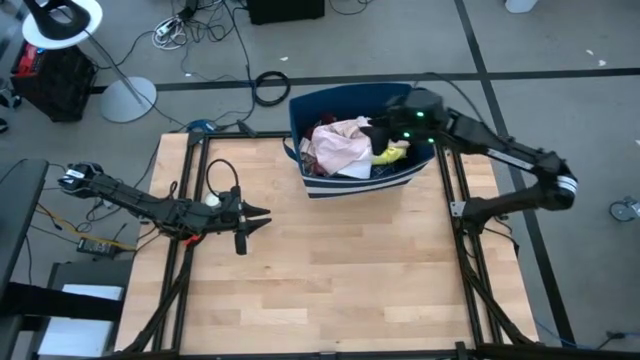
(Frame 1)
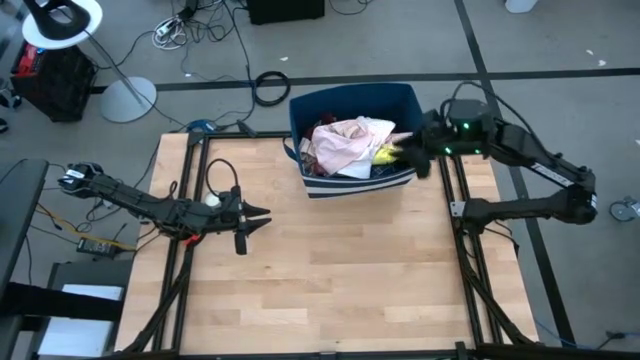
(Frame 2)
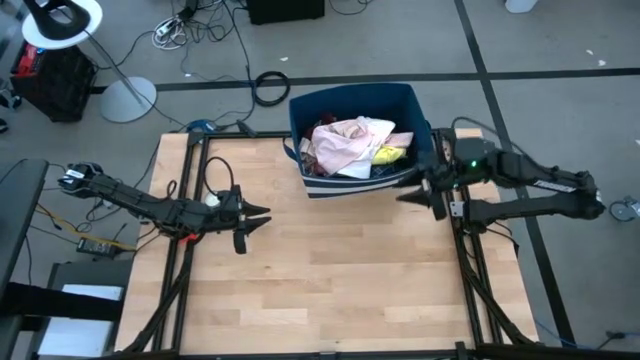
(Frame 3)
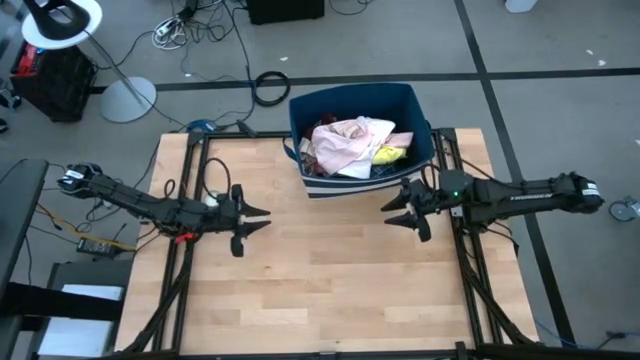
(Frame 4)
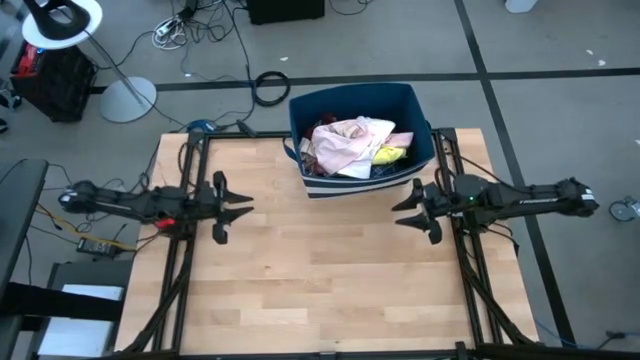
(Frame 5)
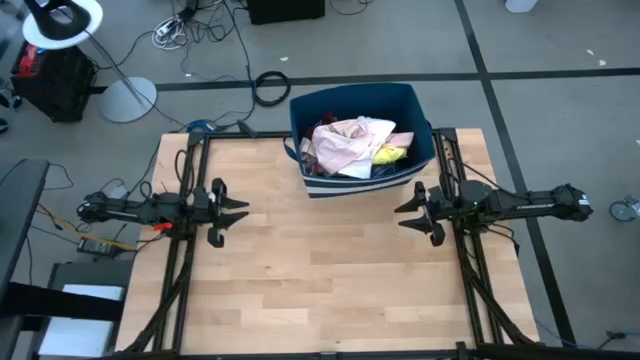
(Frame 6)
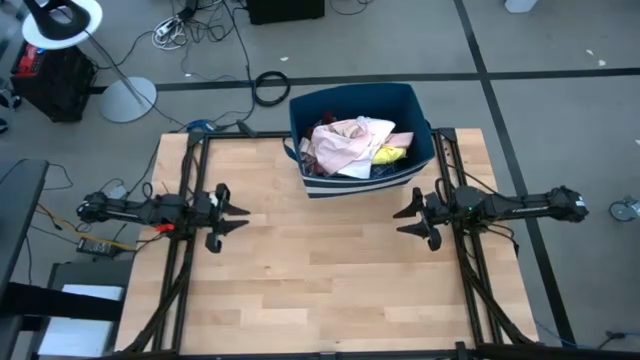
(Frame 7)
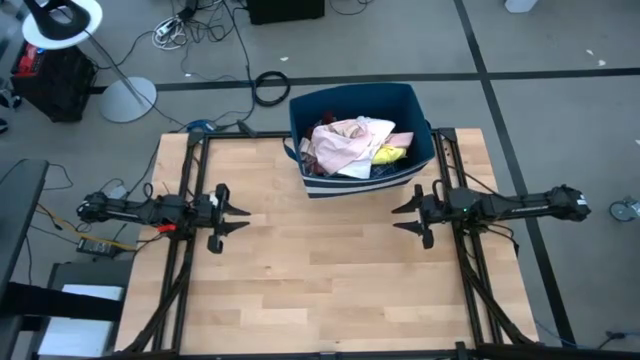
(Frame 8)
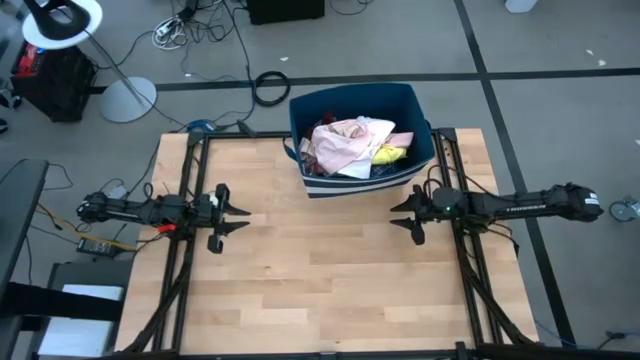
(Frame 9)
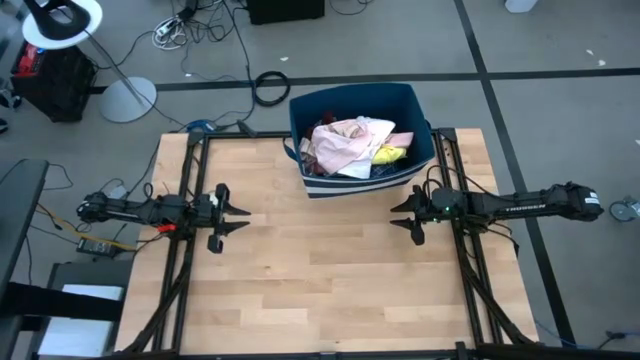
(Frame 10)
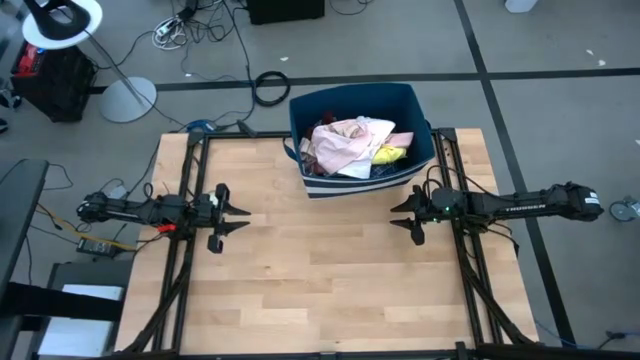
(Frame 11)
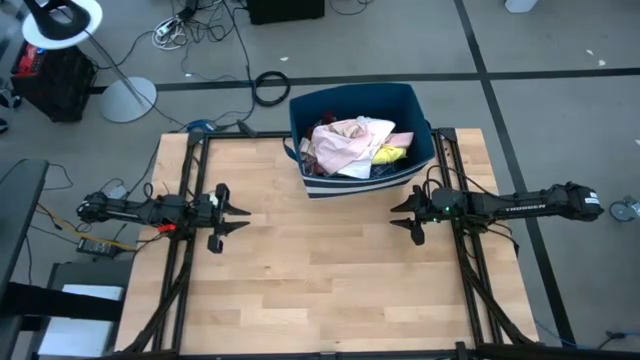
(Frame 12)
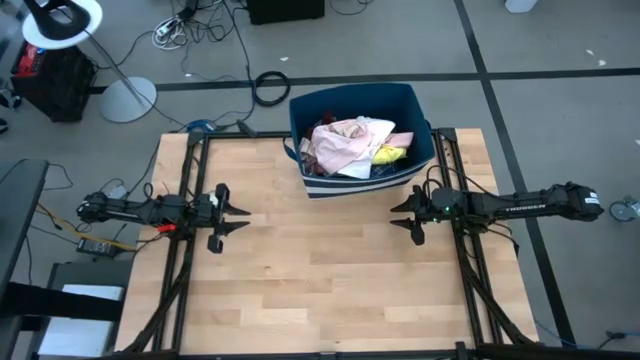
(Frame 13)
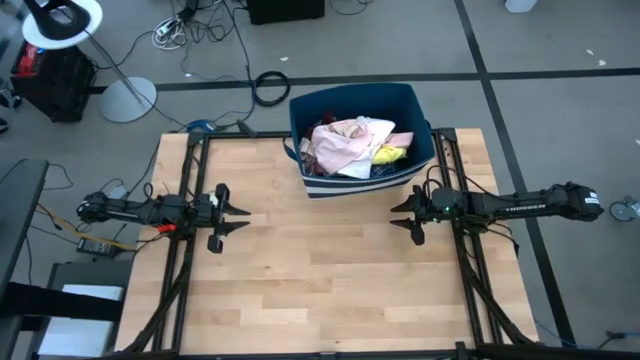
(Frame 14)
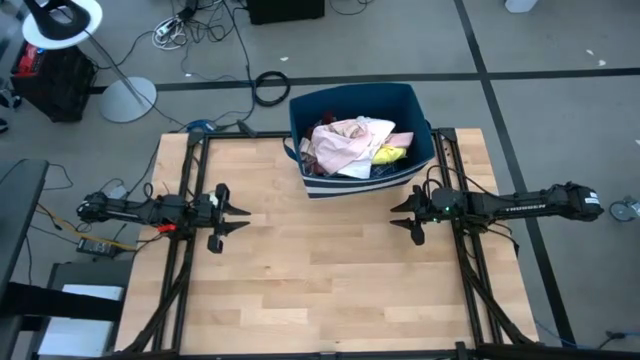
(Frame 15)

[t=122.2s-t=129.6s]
Task: Sort clothes
Return to Home Position

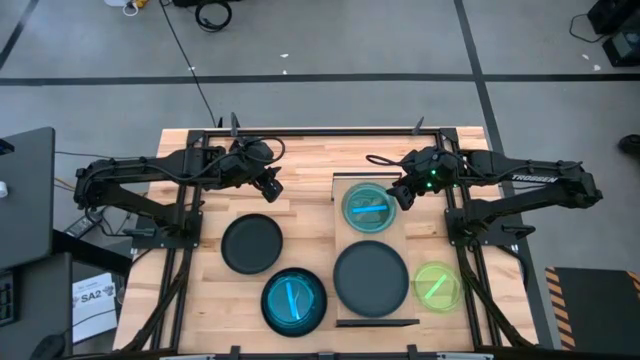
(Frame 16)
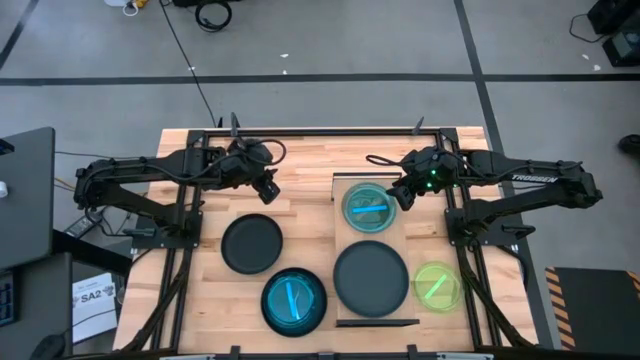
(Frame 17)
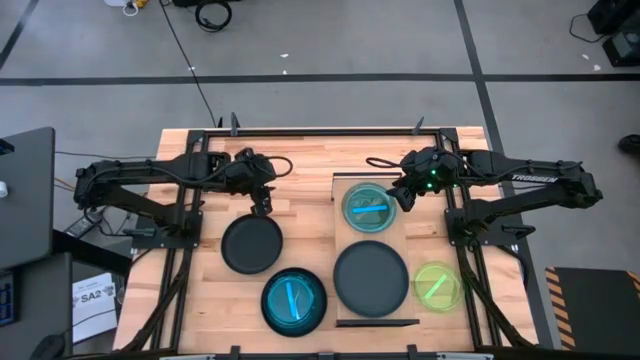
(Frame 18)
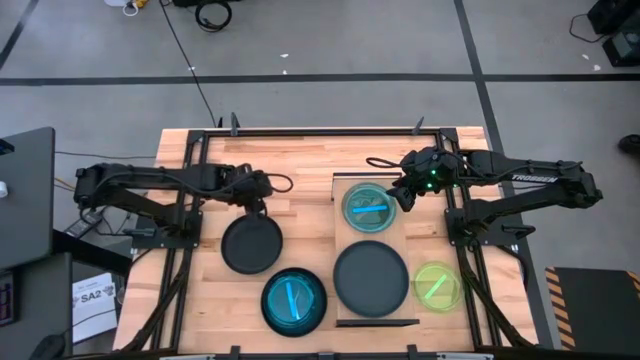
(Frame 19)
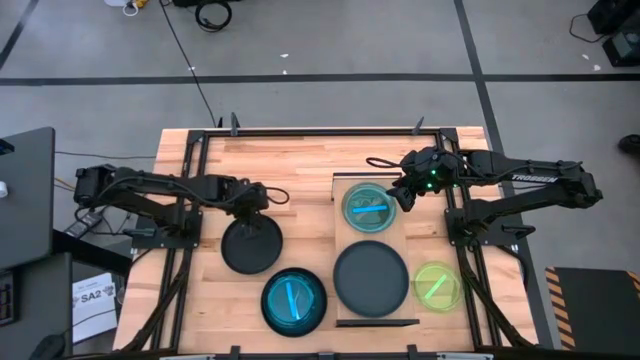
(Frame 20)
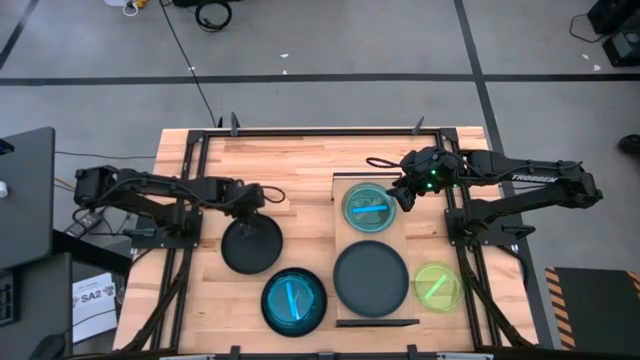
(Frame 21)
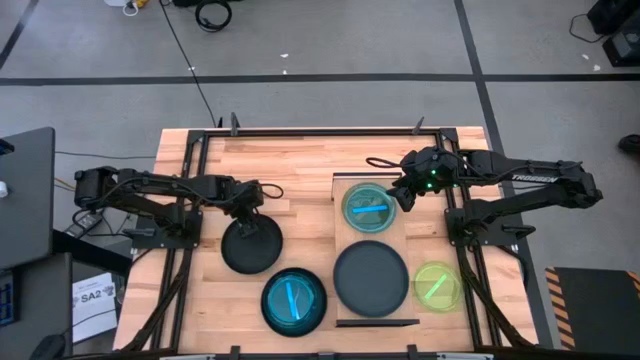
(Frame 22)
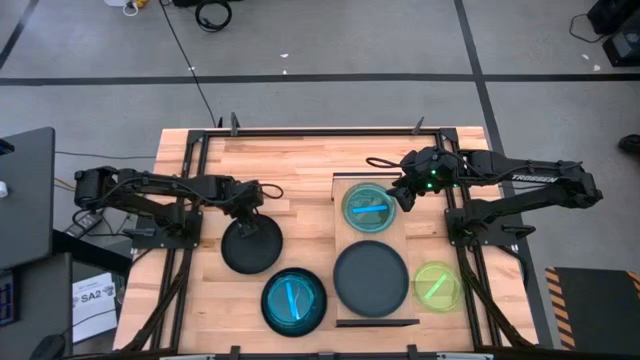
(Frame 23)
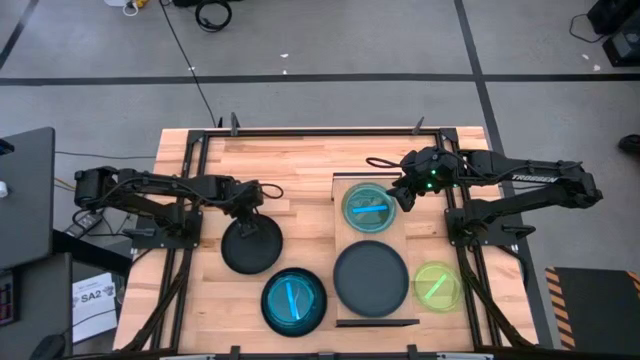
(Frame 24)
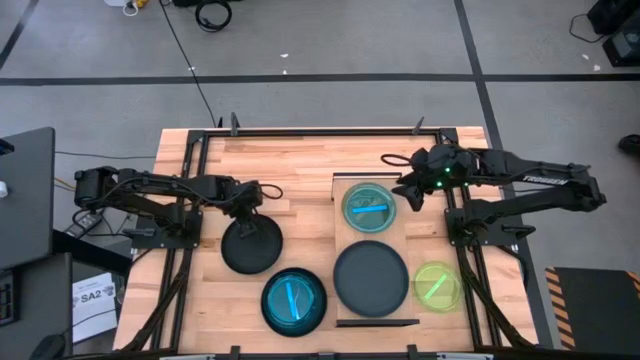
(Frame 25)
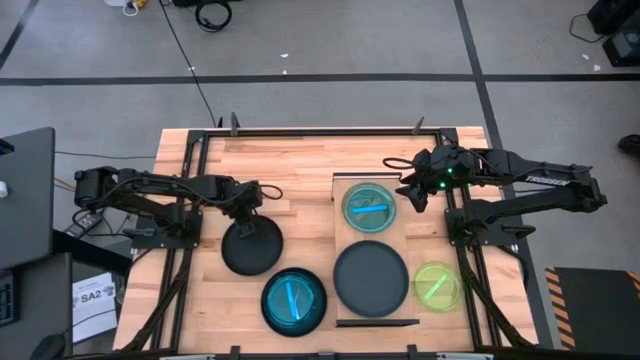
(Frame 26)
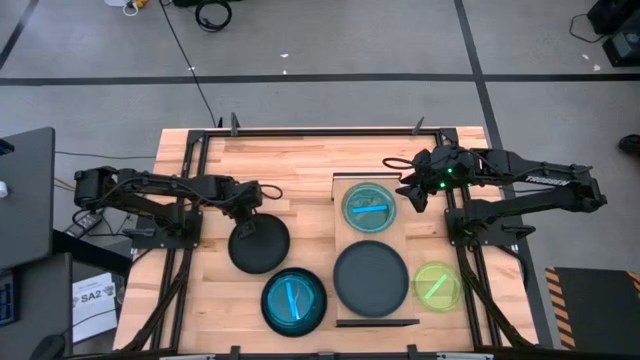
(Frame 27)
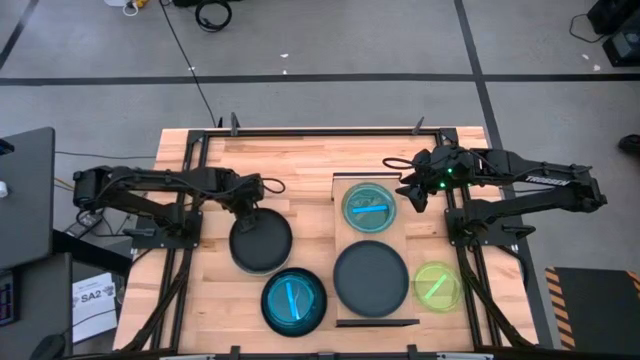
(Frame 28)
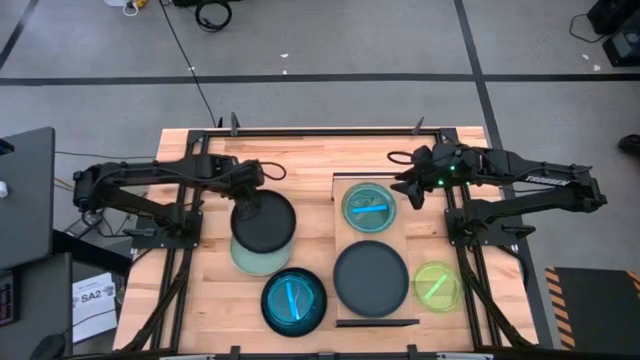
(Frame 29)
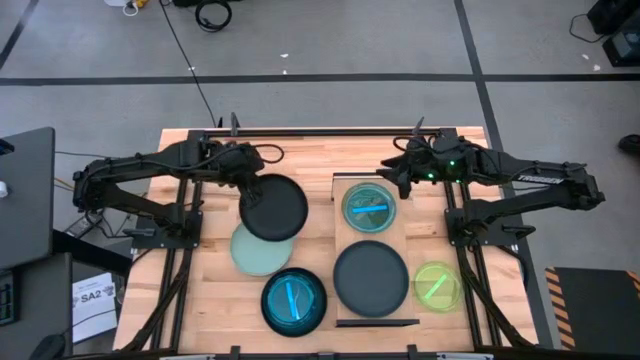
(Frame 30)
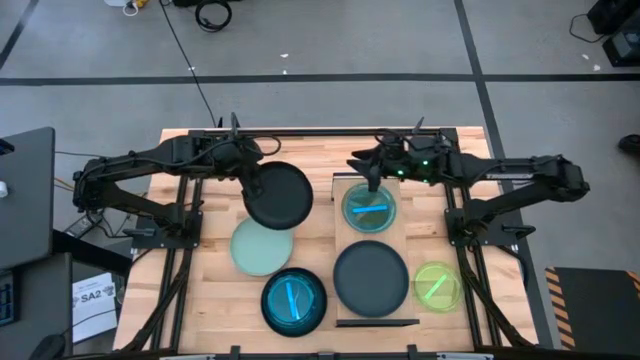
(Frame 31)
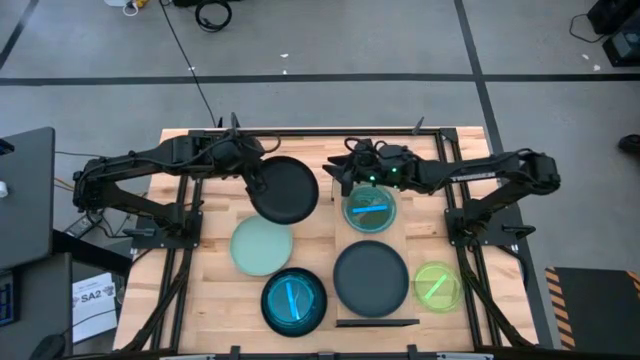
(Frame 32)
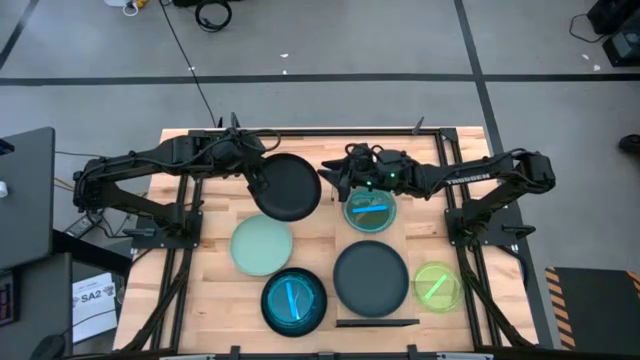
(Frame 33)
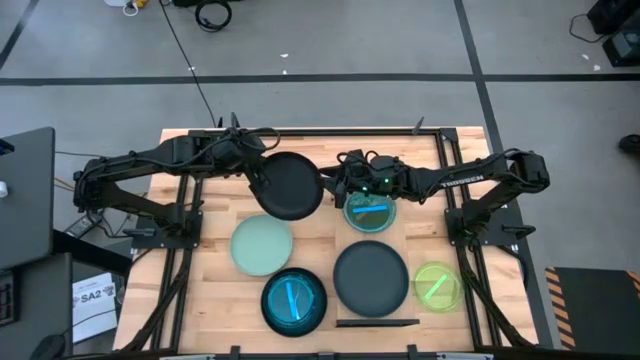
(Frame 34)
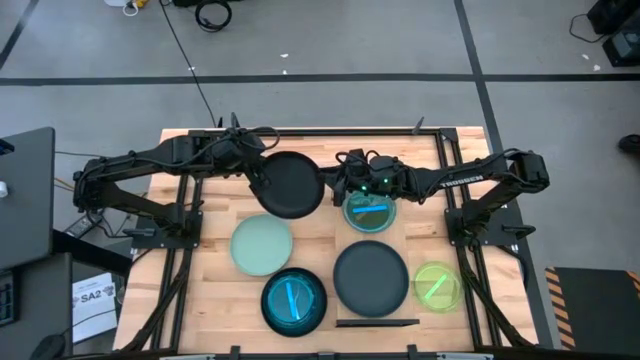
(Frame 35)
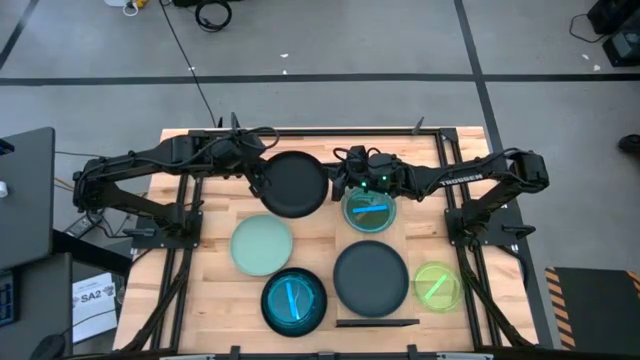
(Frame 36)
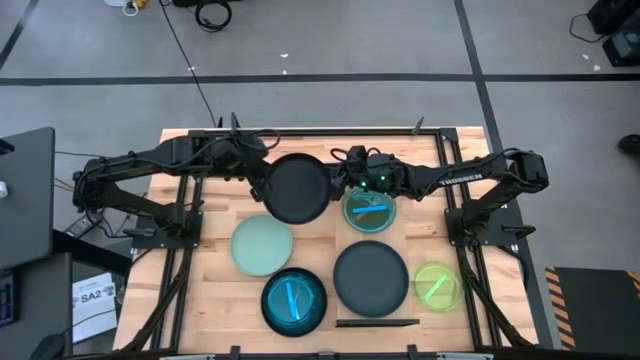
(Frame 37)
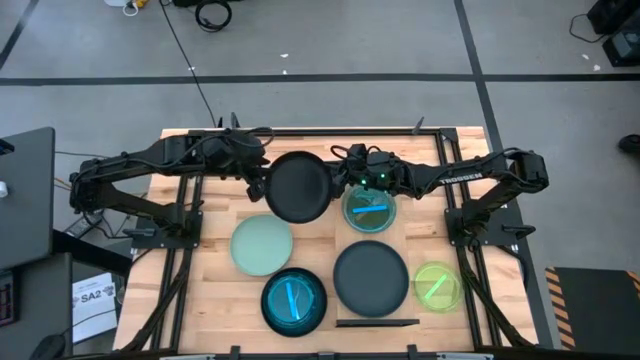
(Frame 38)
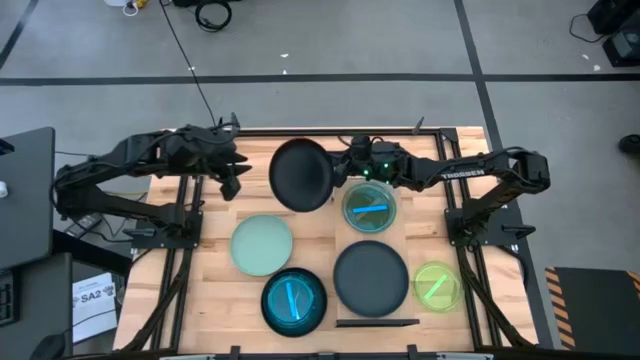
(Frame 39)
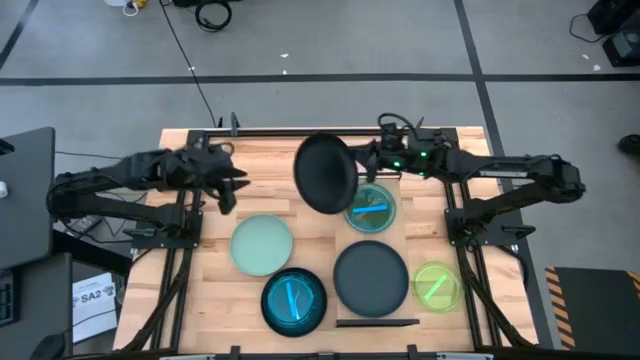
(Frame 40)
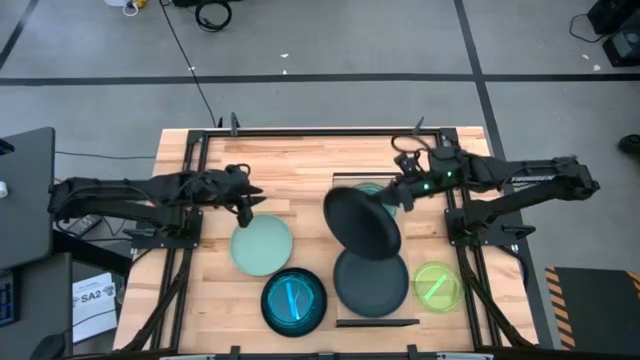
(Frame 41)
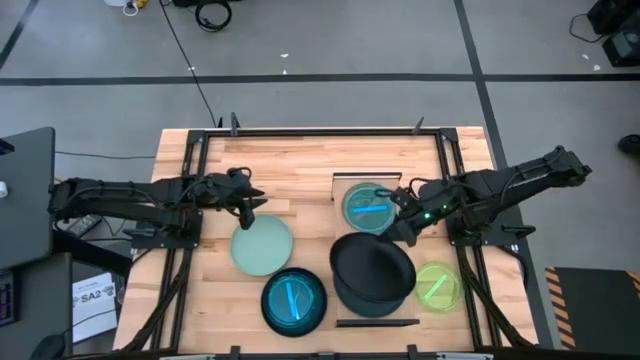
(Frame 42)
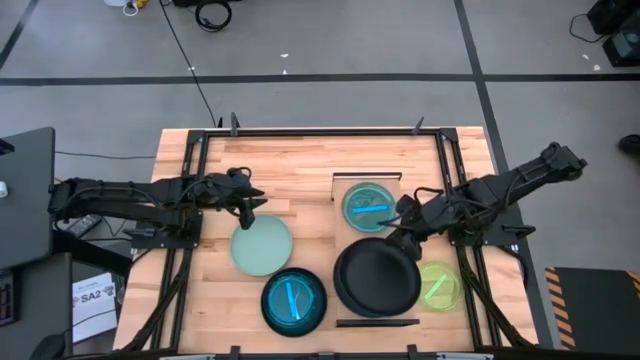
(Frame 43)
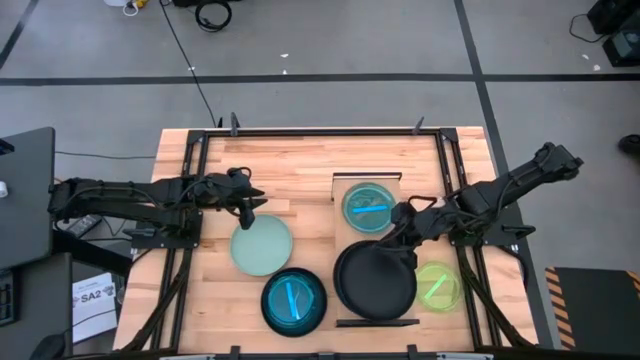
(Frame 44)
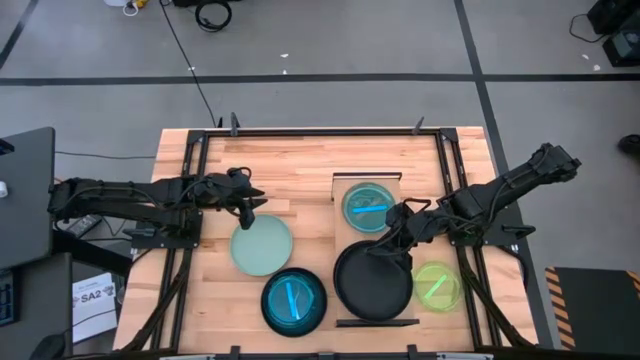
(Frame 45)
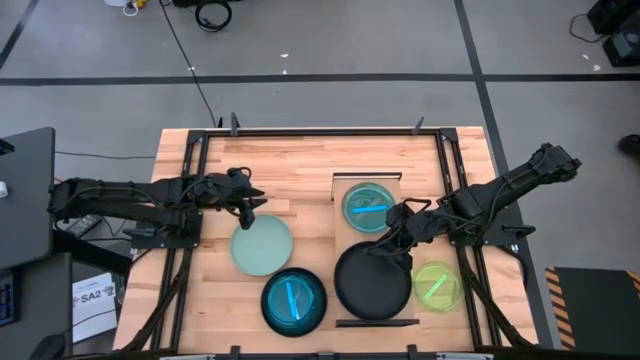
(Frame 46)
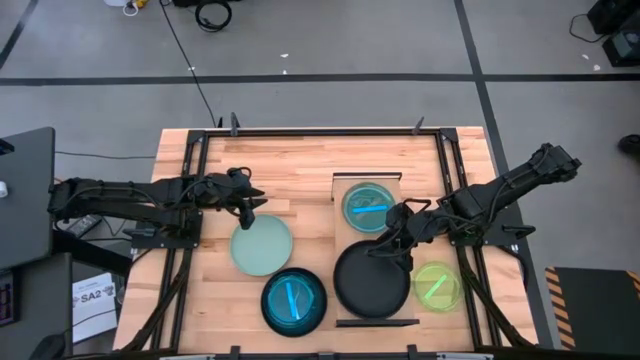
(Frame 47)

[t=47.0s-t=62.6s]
Task: Place and stack plates onto a shelf
Put the top black plate on top of the black plate on the shelf
